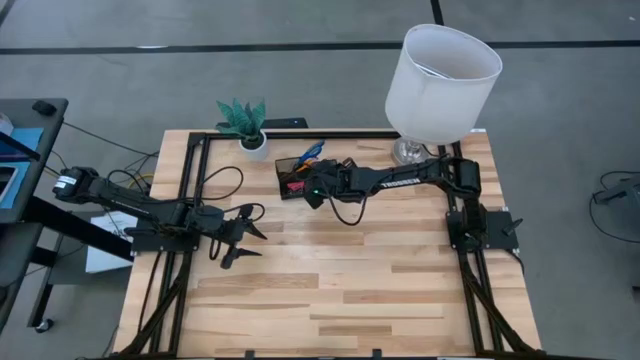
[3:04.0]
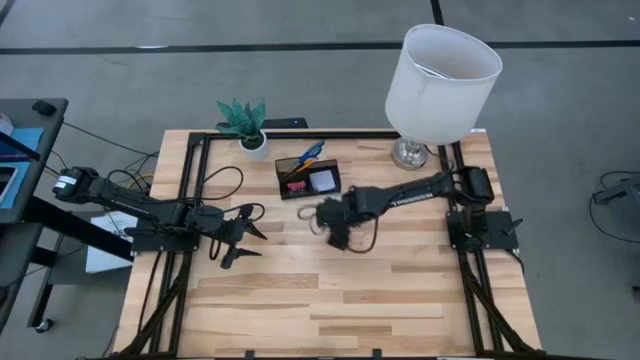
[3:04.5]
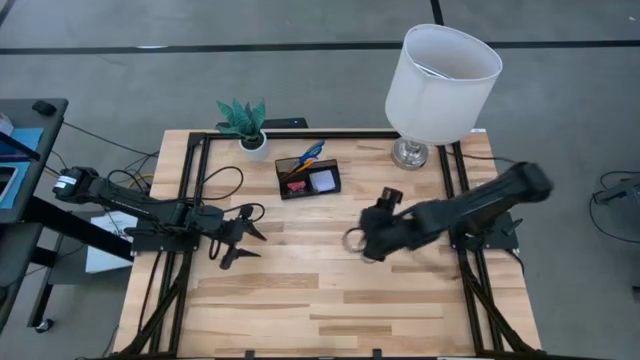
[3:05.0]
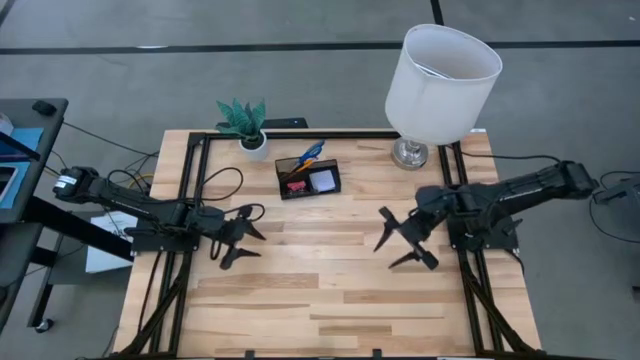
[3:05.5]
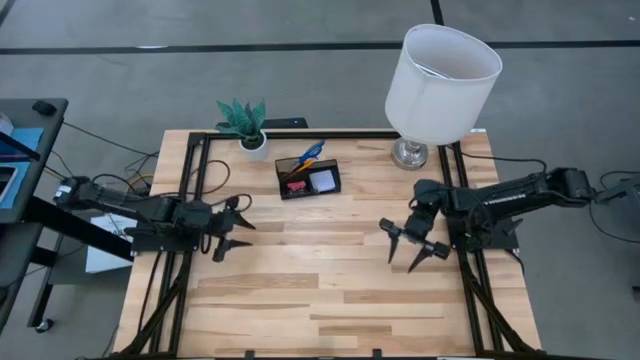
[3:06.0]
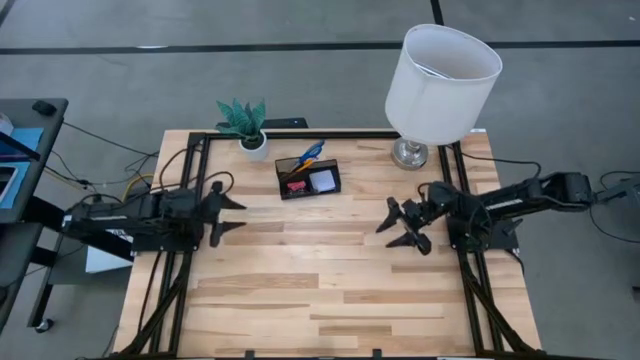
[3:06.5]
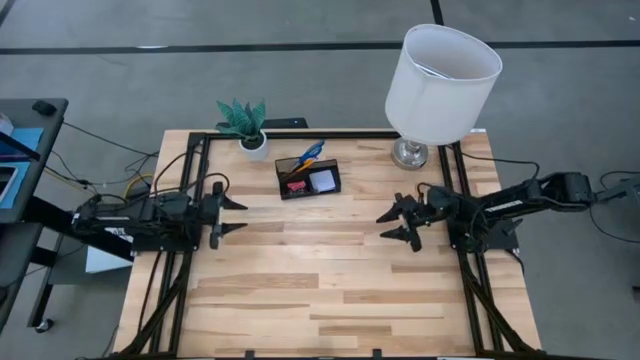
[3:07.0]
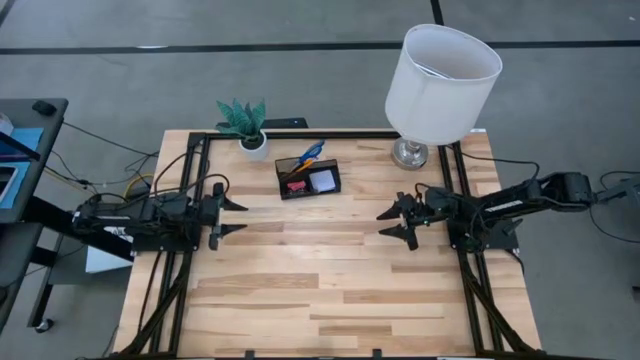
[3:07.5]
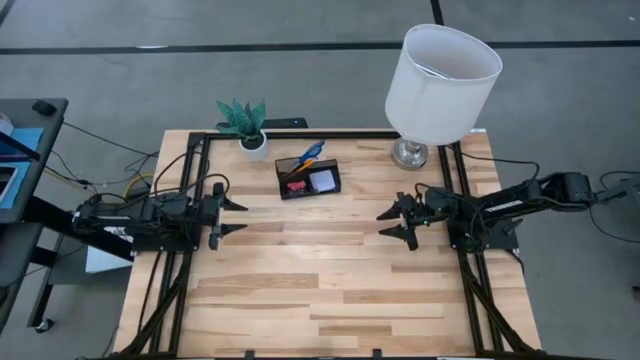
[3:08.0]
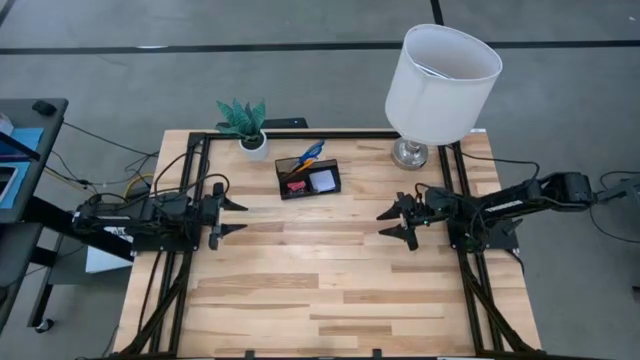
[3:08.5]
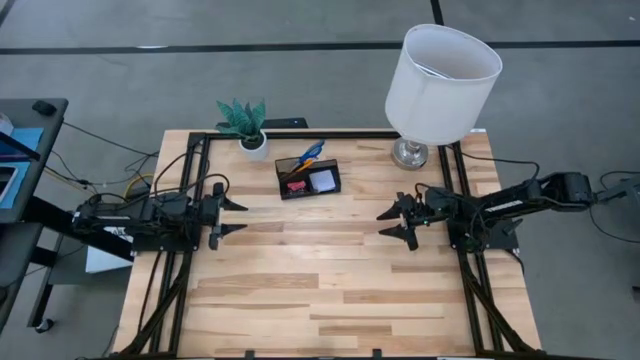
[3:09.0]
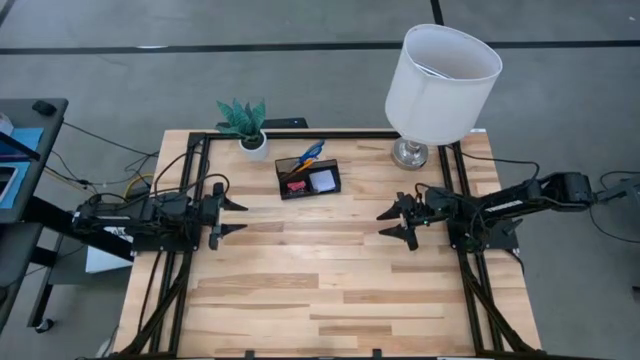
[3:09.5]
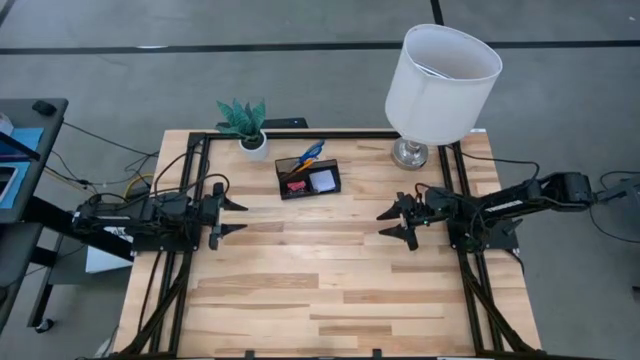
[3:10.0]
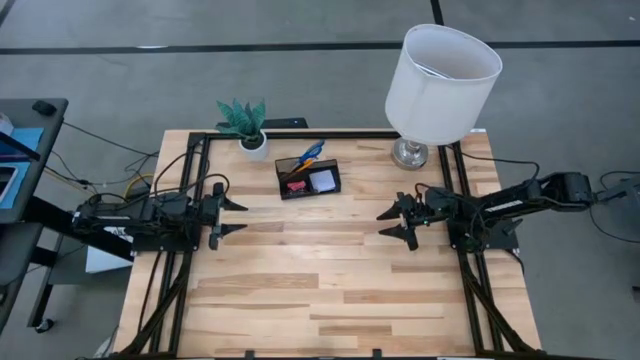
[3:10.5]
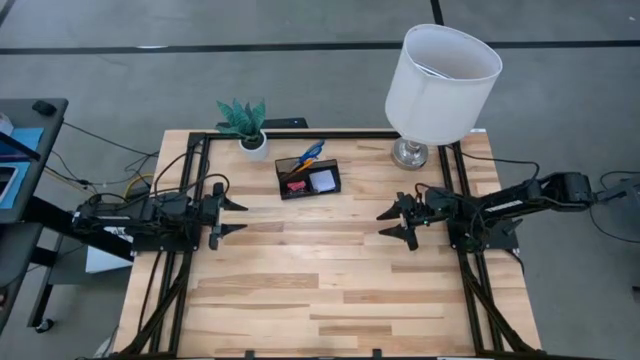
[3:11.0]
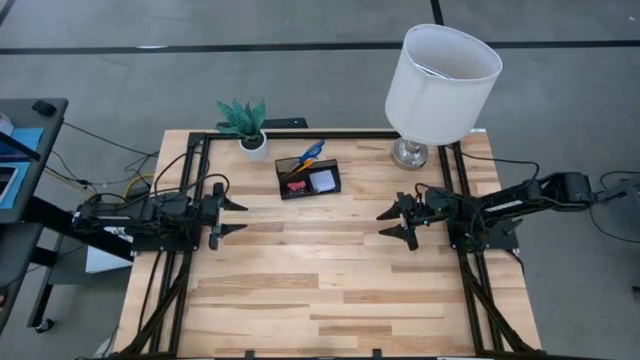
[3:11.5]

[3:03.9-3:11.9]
Task: Pick and place office supplies into organizer
Return to Home Position

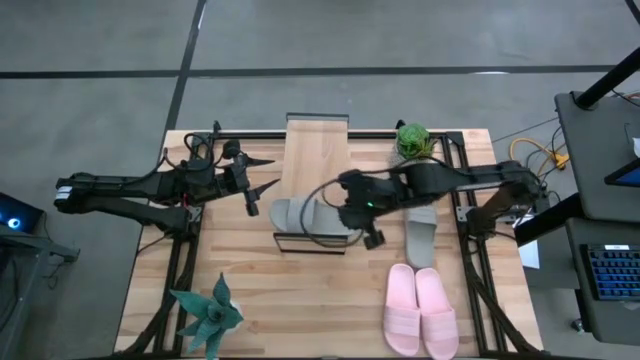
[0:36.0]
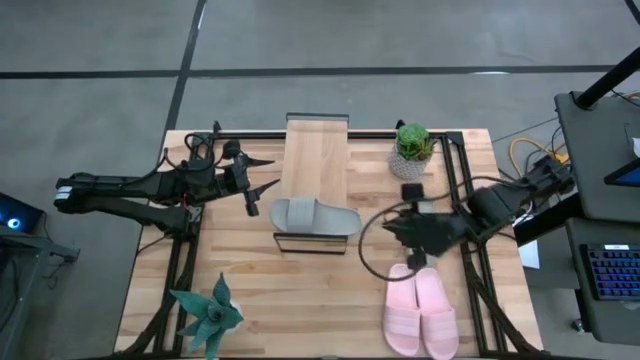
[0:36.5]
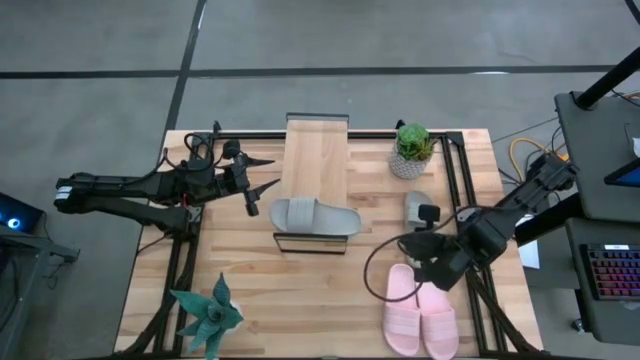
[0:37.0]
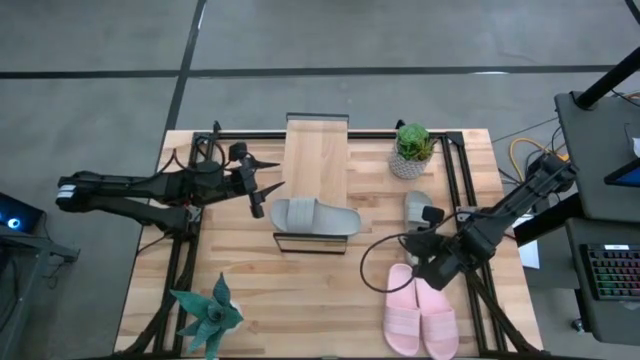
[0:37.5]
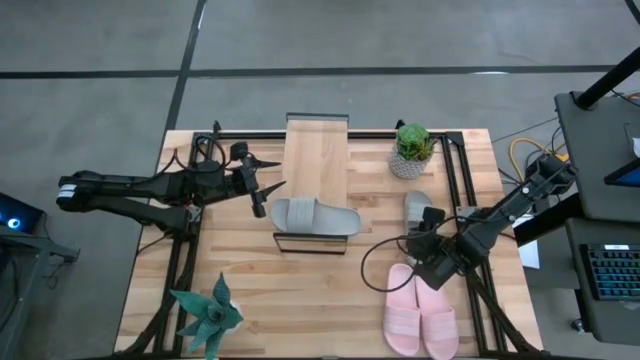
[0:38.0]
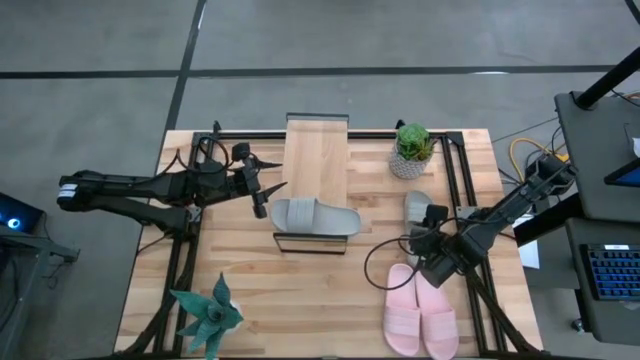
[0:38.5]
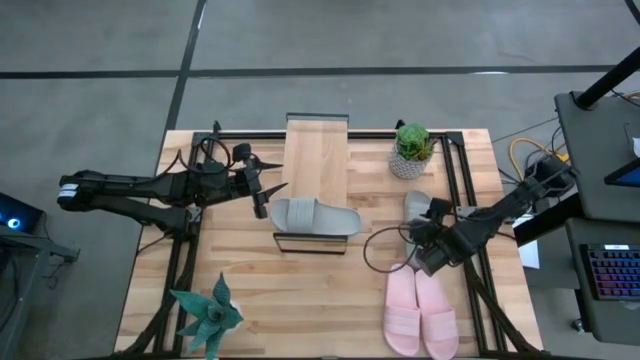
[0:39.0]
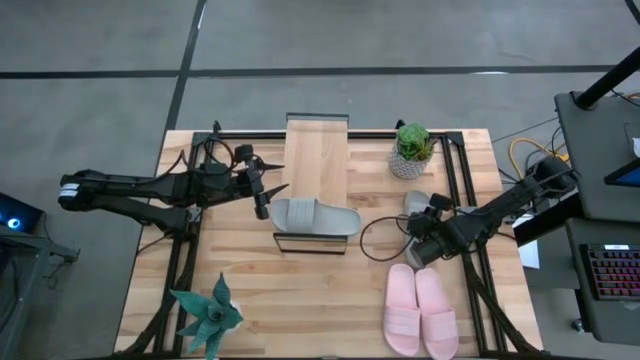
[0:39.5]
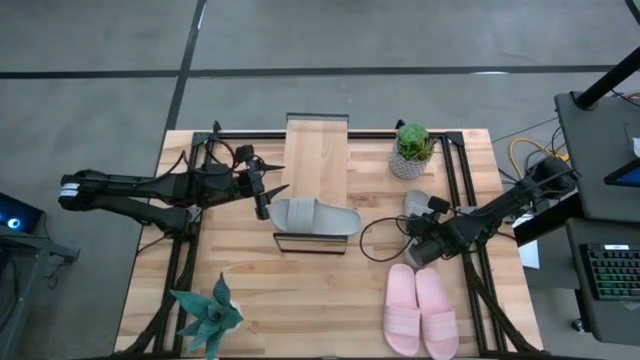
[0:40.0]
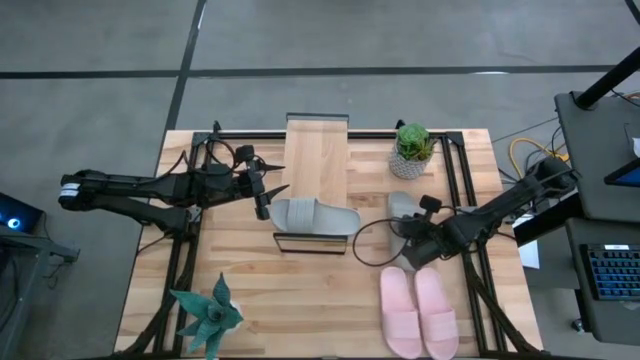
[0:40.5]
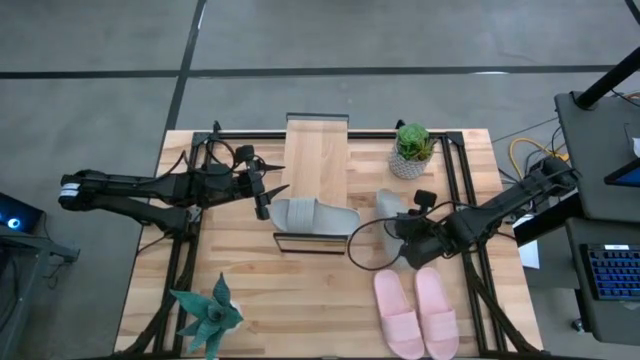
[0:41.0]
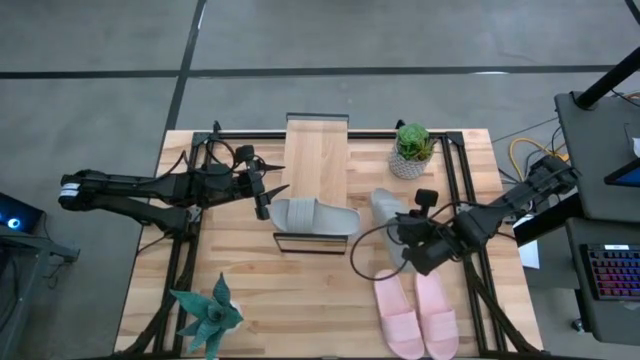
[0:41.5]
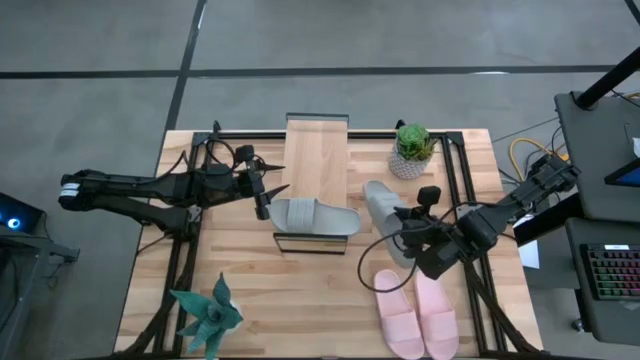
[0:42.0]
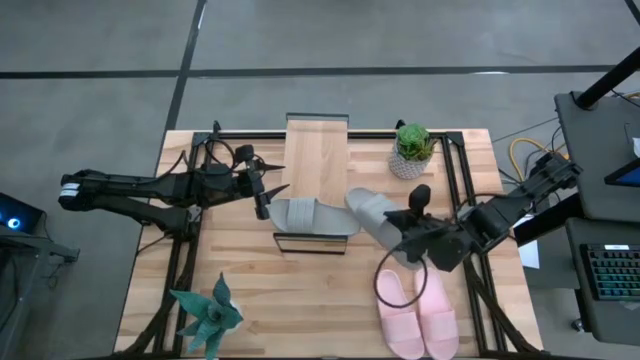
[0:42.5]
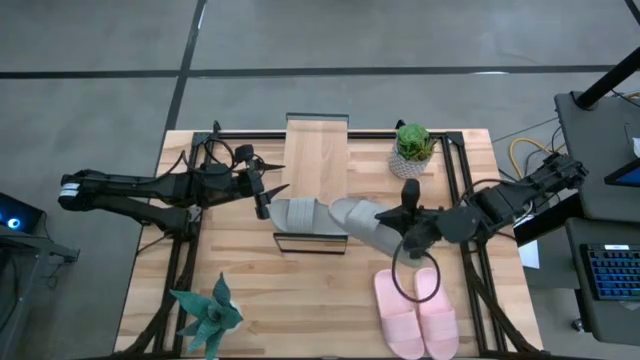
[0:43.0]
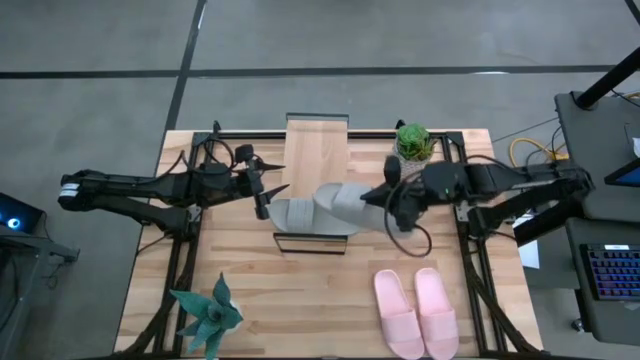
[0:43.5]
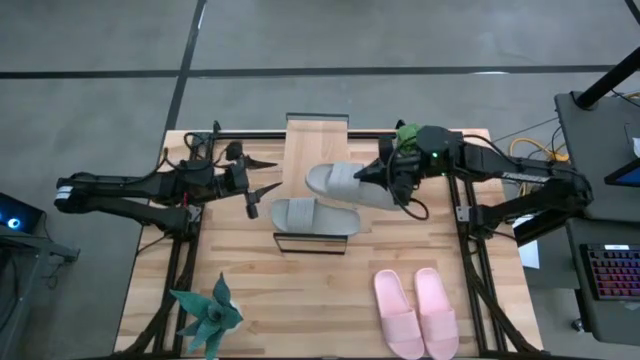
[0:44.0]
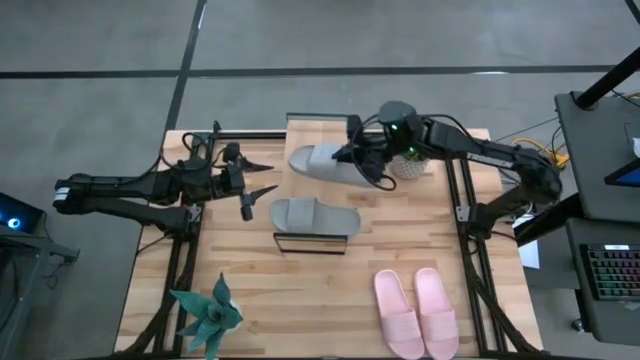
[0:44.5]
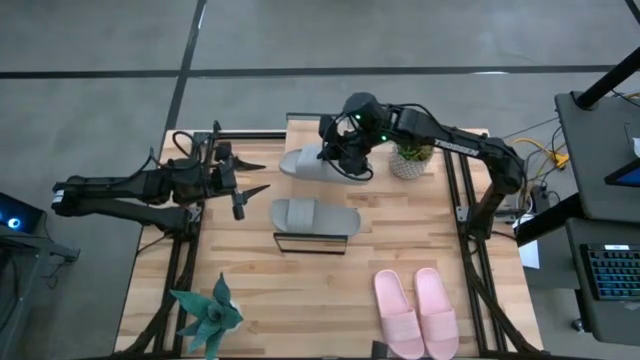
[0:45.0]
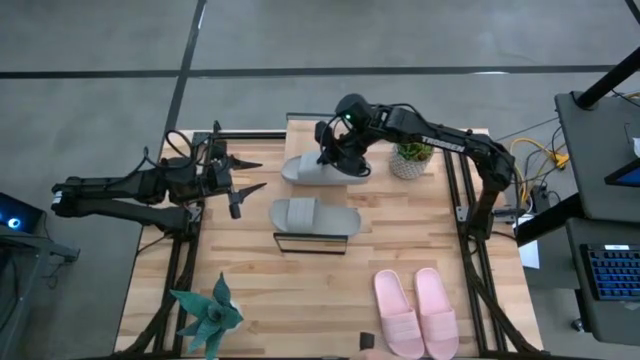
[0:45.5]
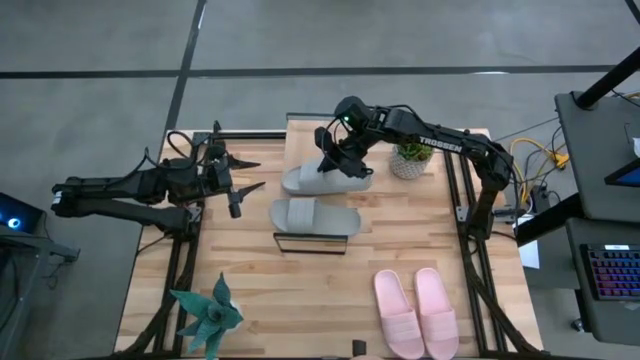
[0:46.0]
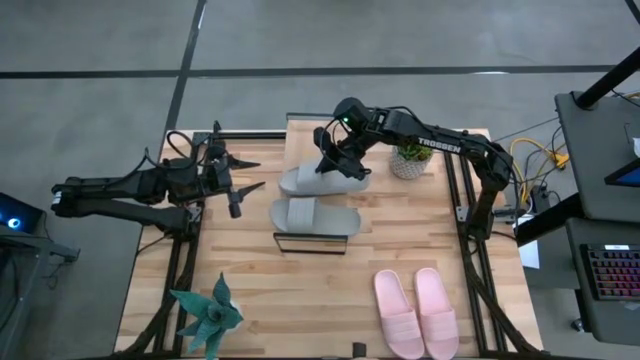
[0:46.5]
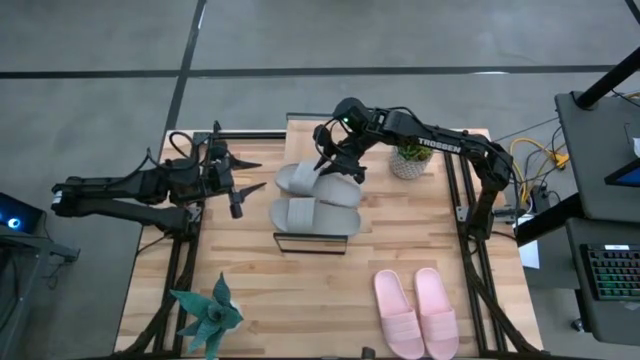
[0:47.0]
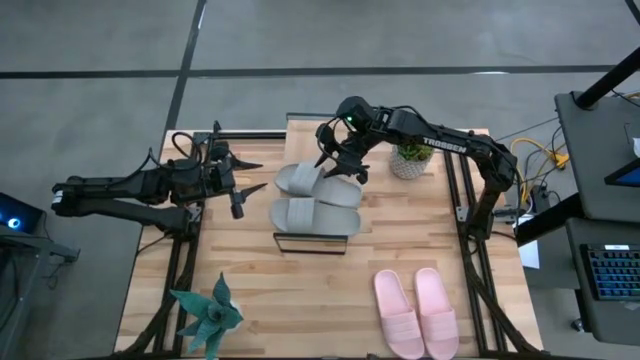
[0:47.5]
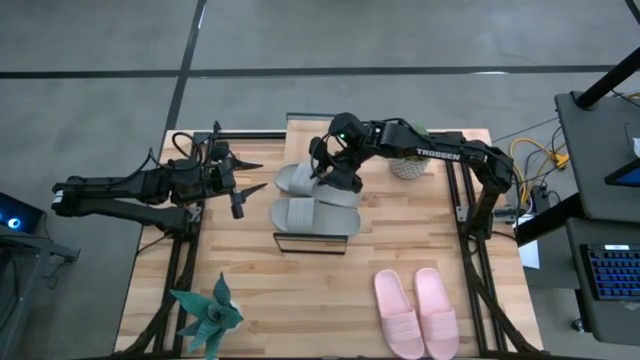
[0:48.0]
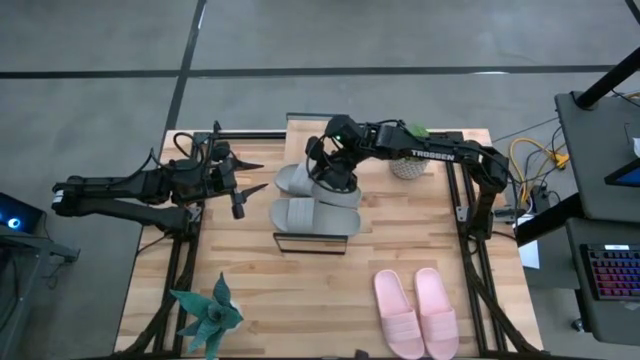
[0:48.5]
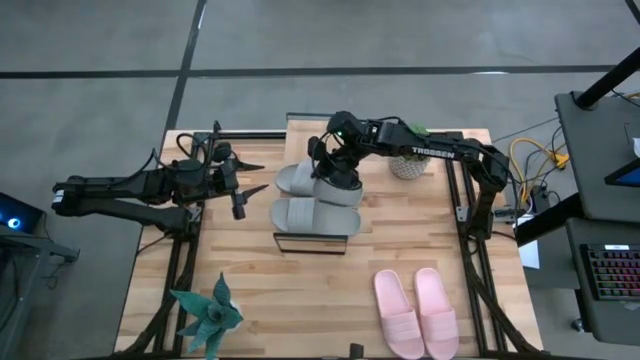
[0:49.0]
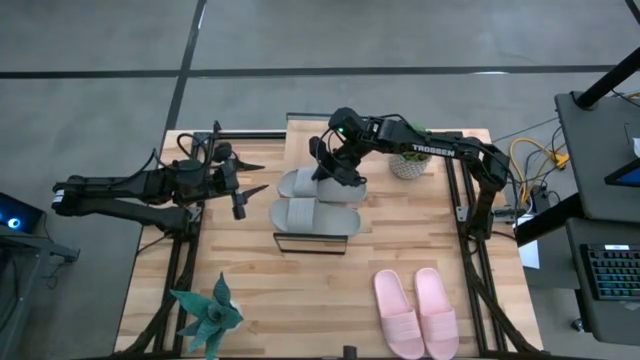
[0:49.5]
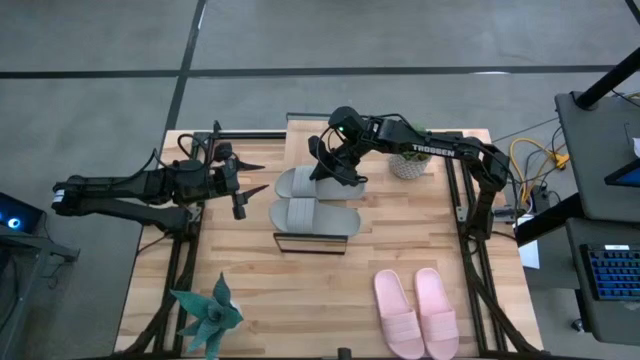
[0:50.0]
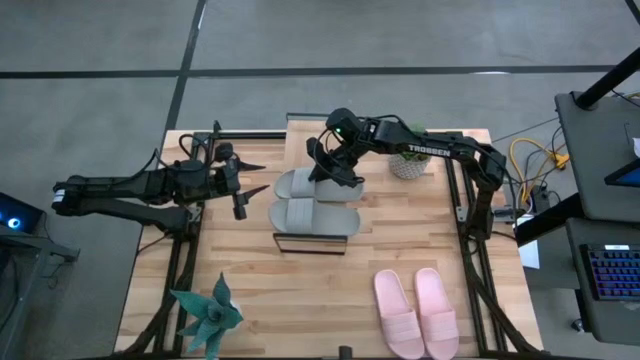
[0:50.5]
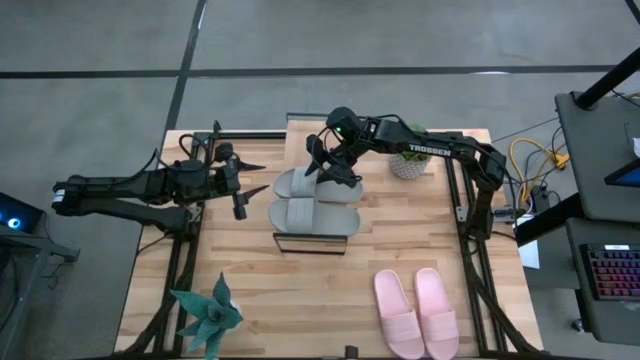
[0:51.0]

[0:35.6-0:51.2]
Task: Pick and place slides into the shelf
Align the gray slide with the other gray slide on the shelf
